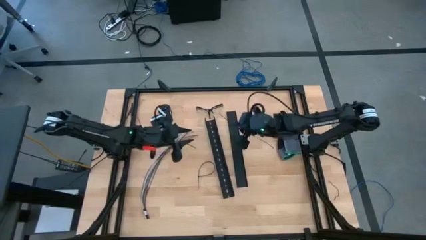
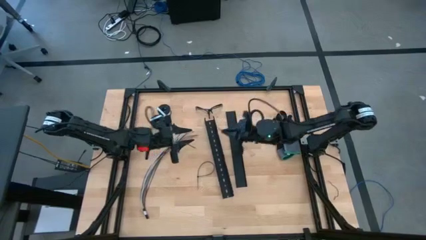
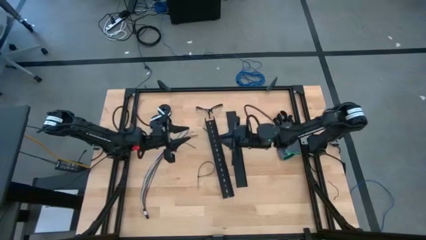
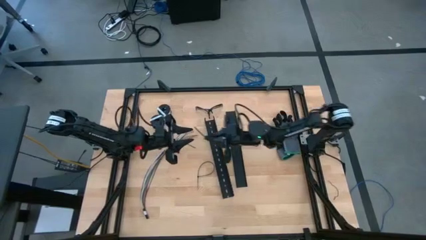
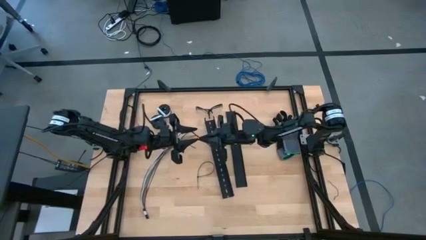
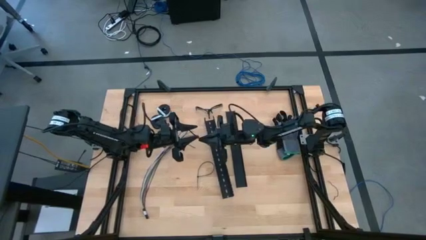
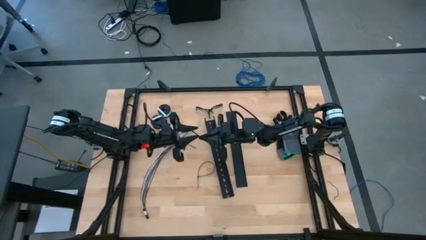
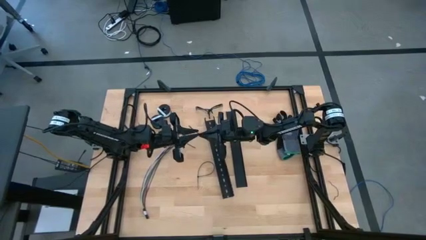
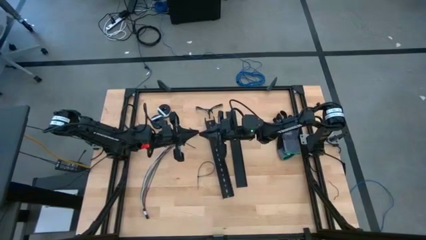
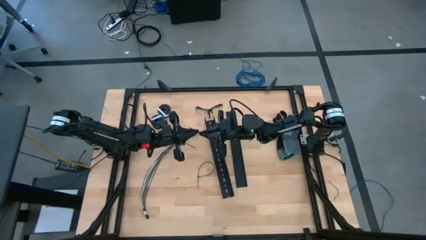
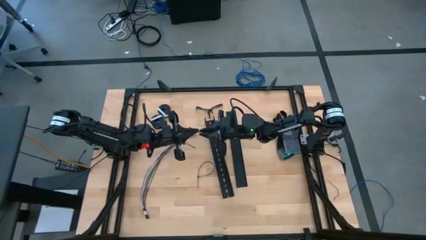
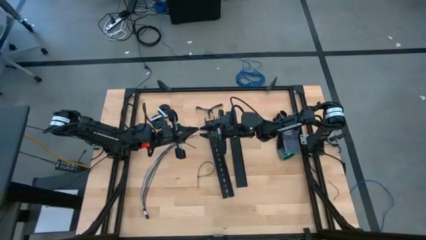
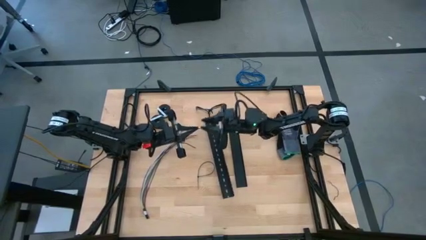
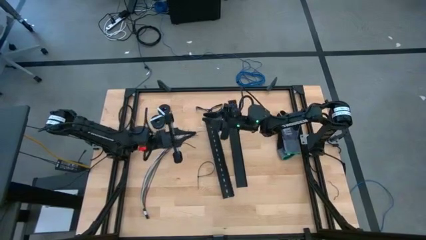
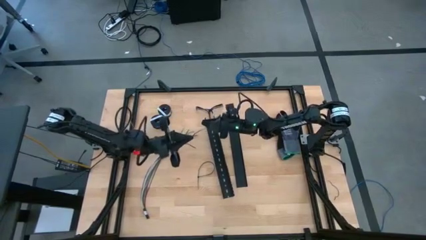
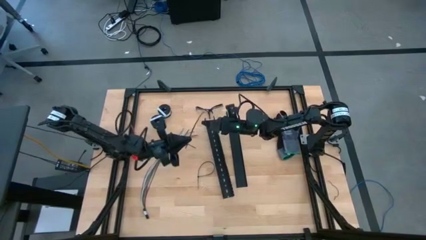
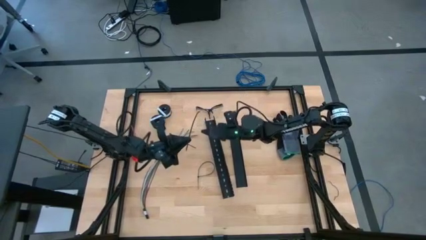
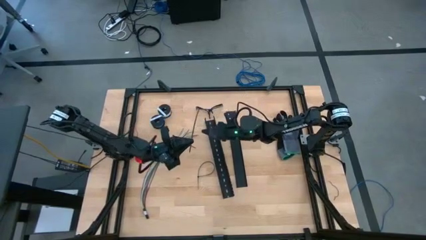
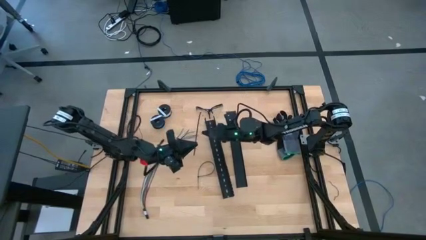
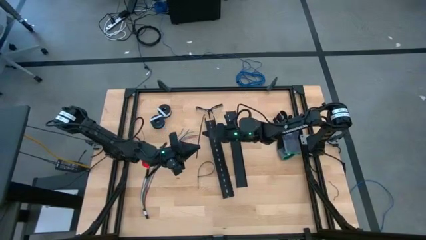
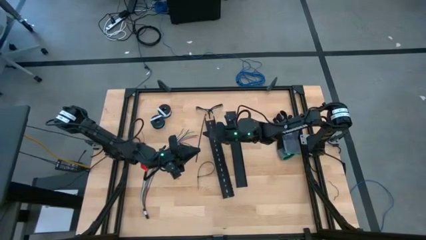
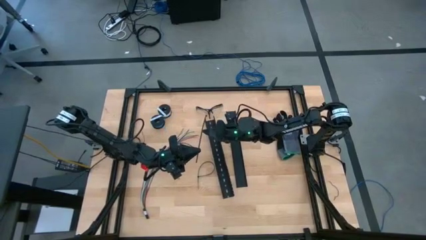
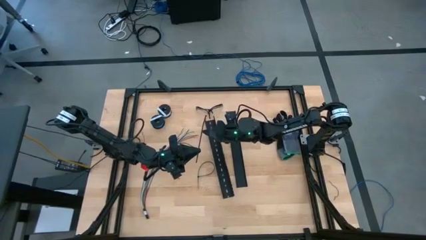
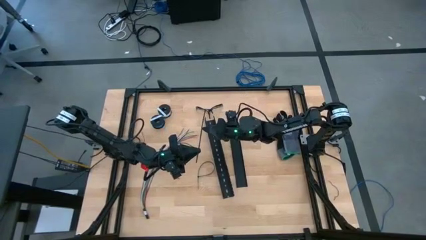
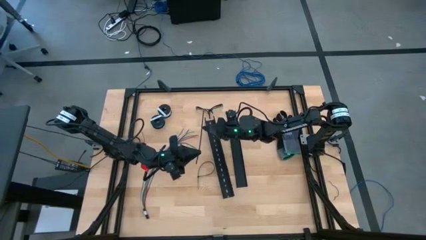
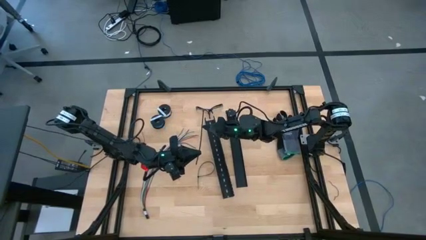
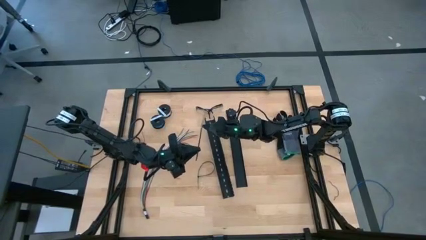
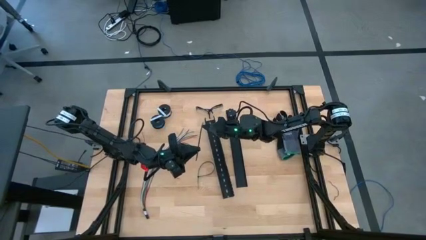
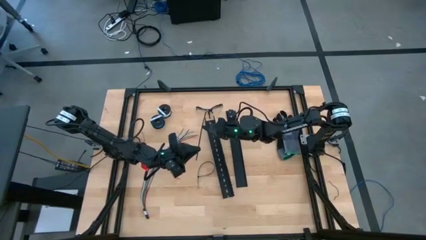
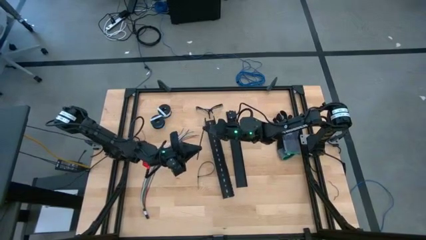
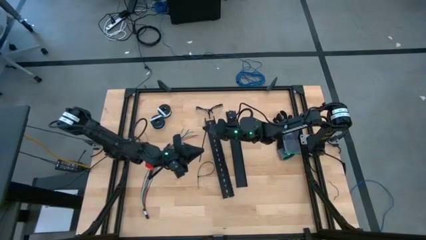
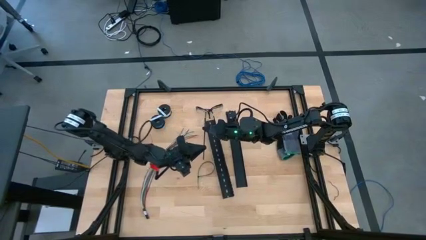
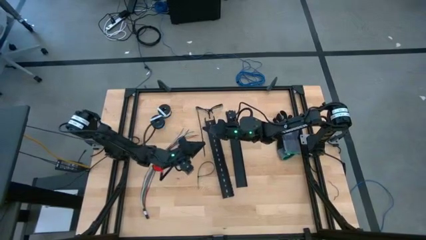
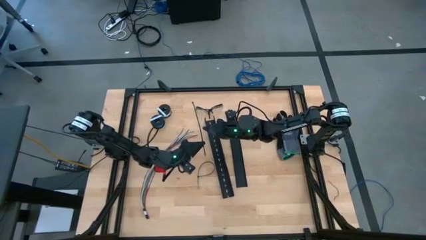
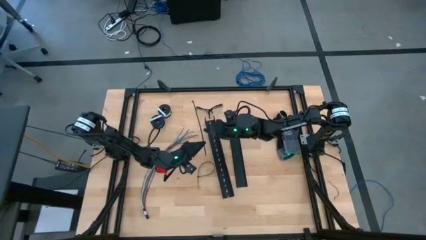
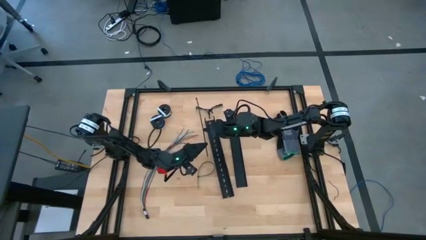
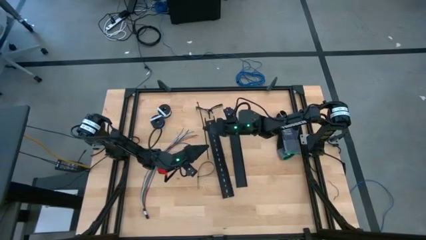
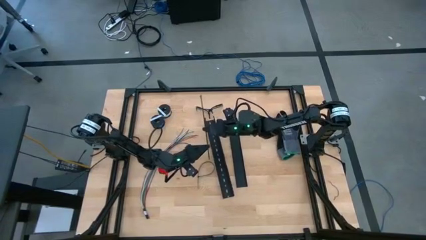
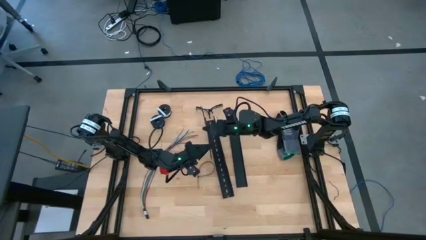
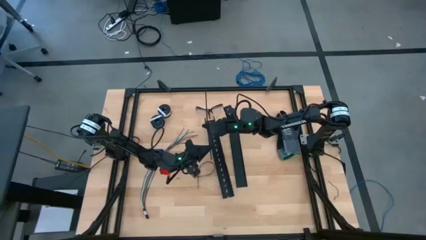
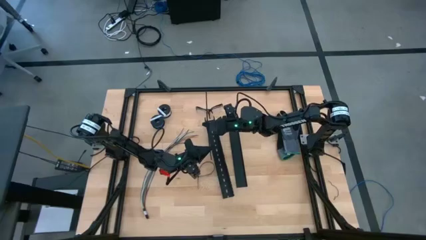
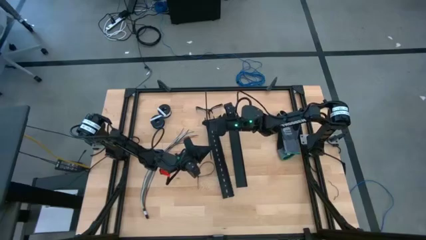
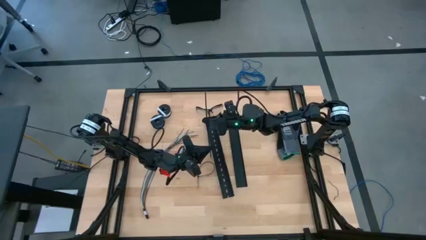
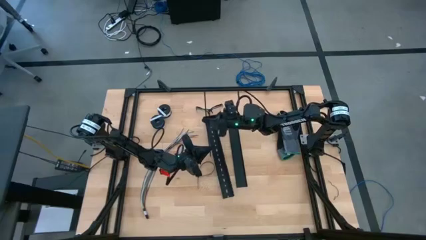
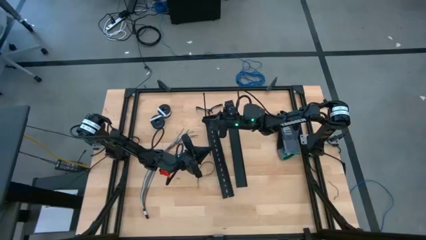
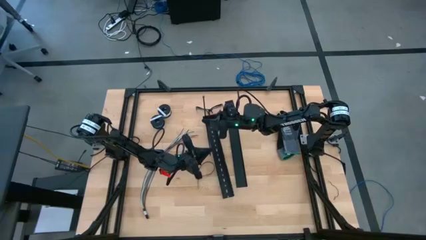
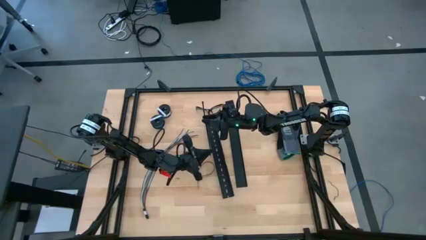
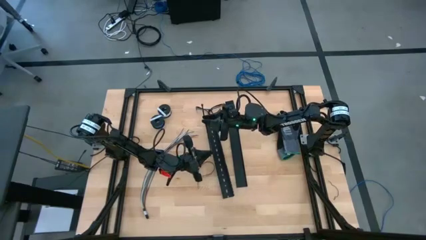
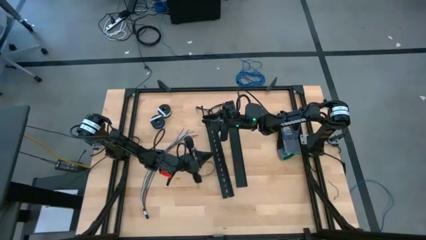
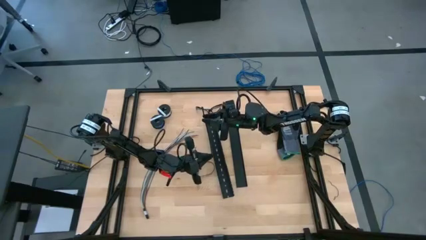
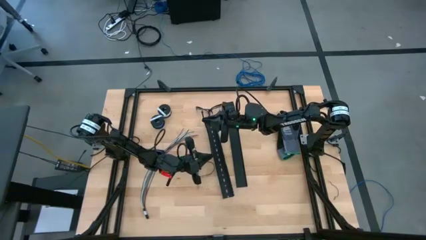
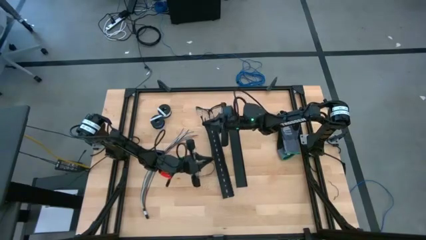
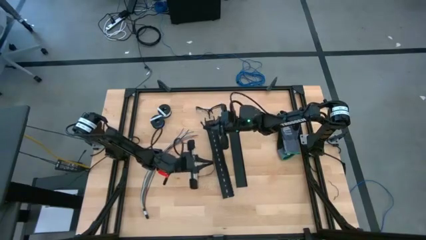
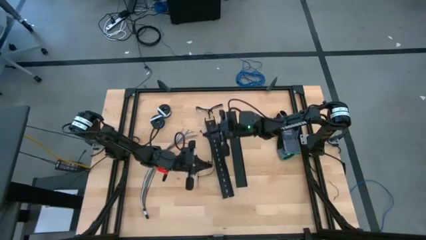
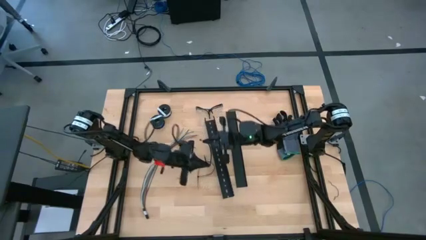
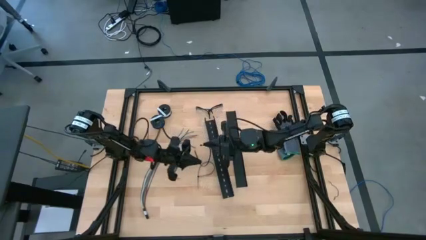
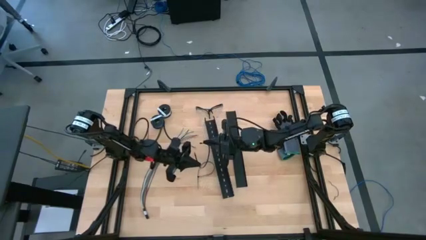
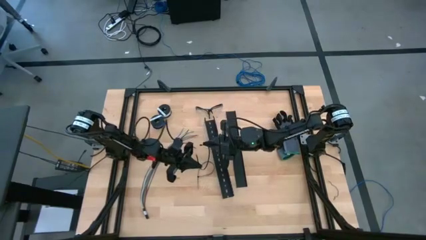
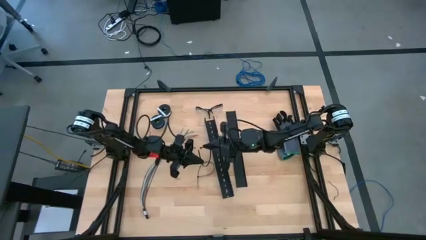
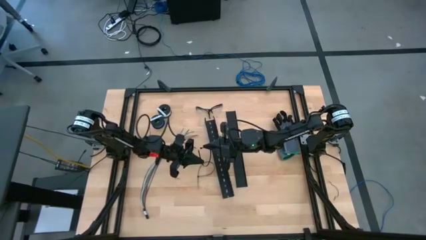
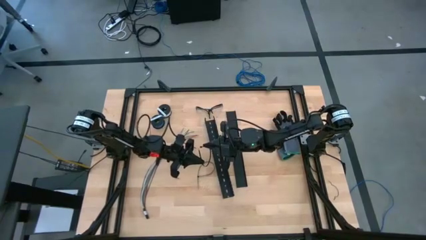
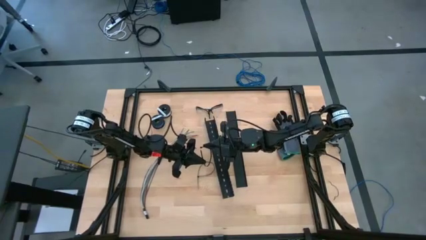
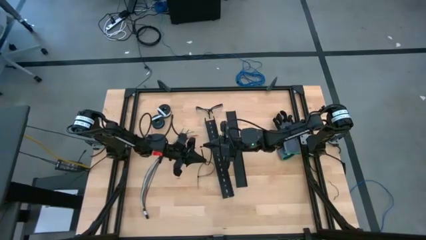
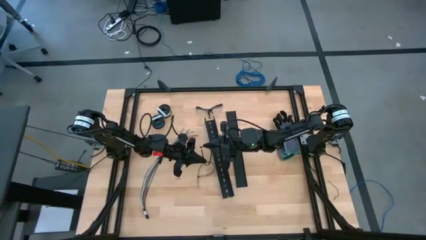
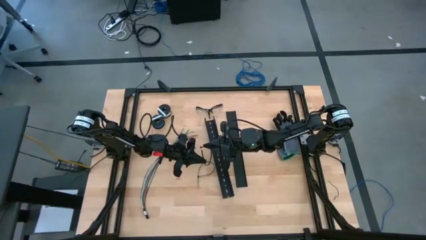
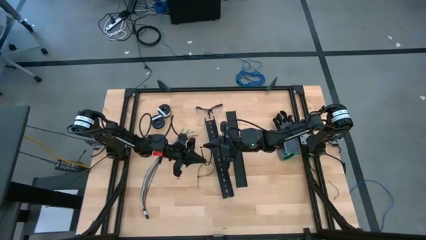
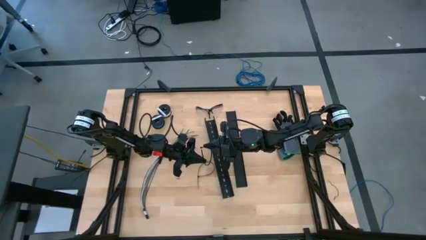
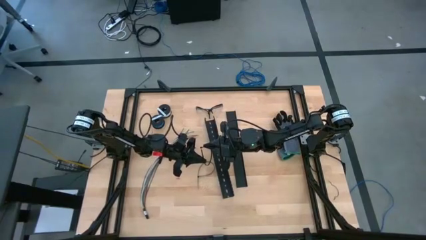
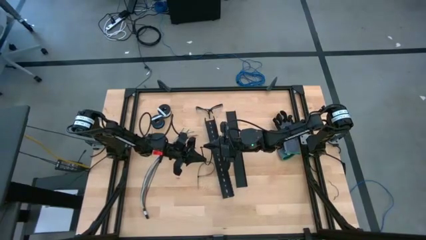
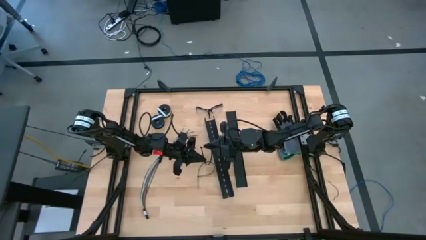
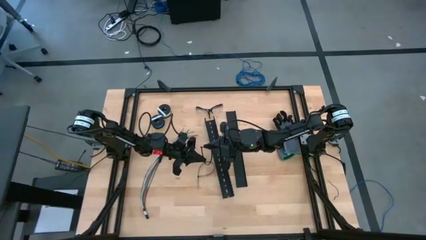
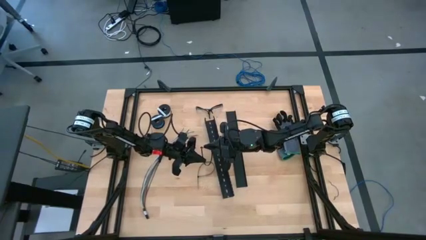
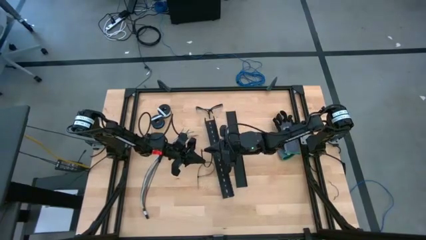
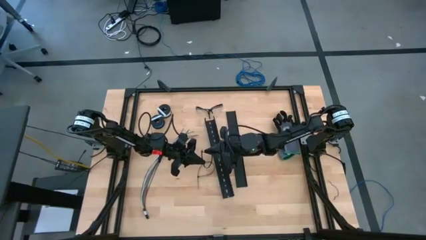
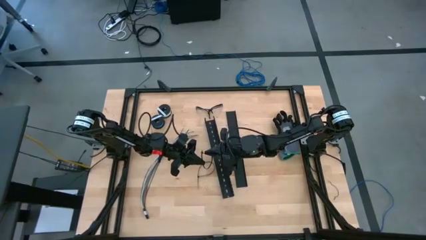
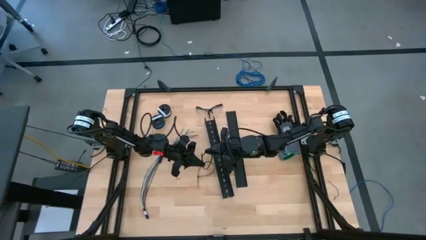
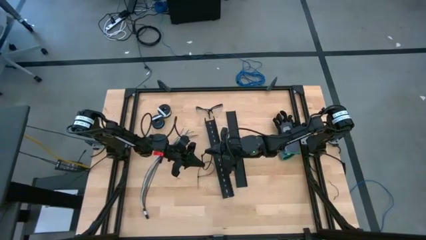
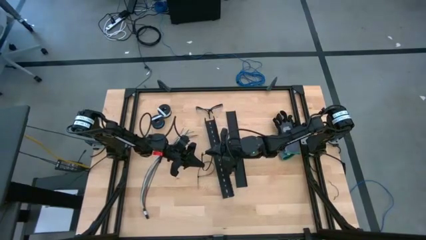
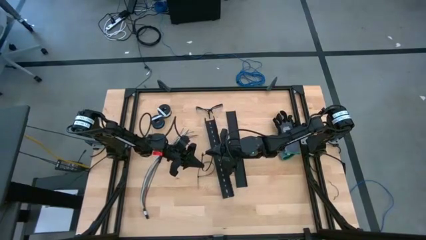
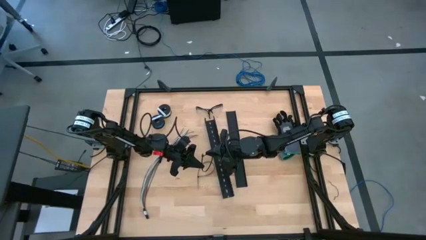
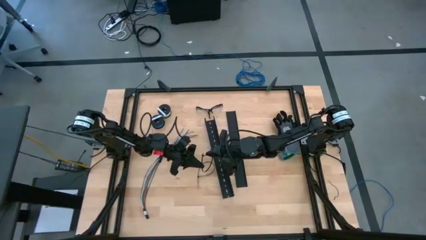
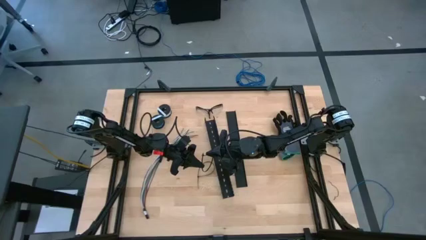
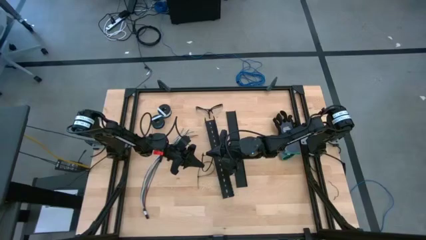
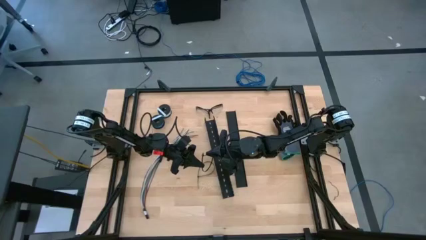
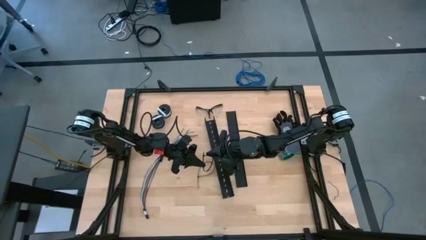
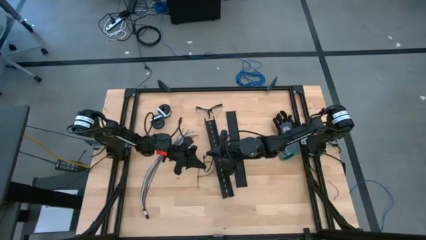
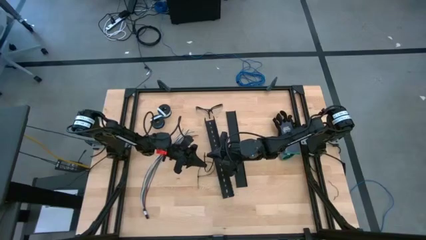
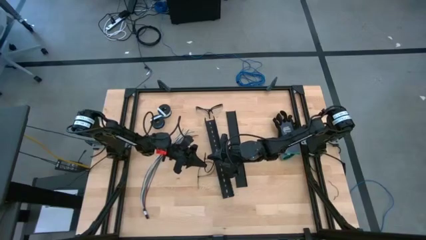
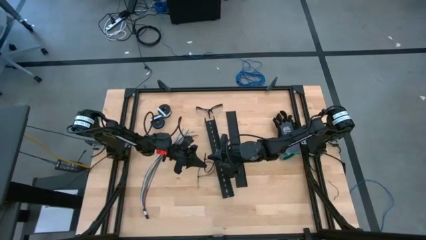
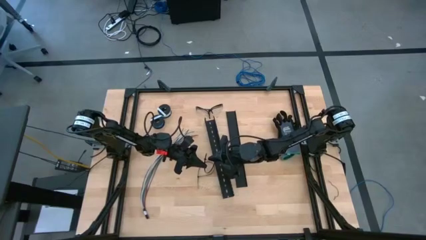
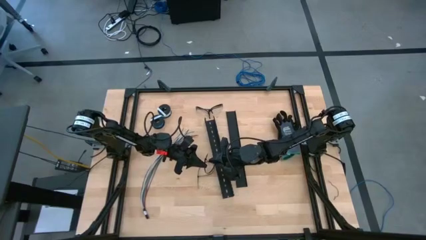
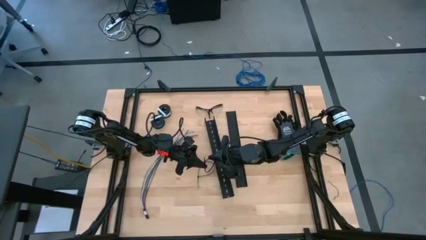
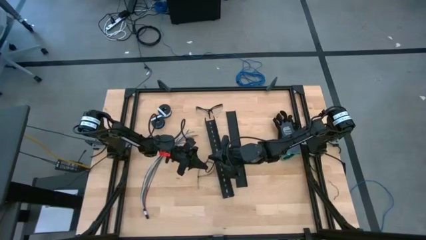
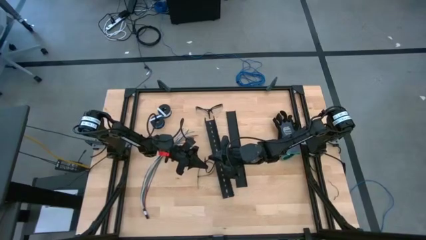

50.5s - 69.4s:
Task: Ziptie cables
Wrap the black zip tie on the cable
